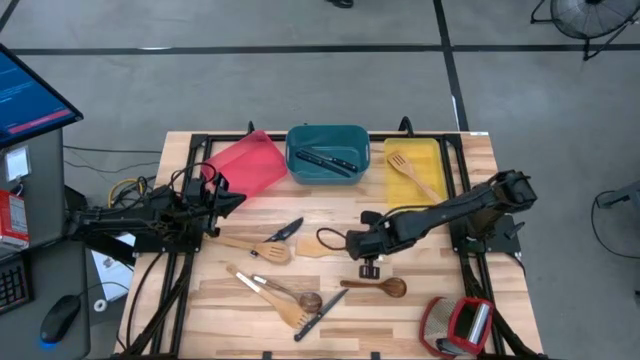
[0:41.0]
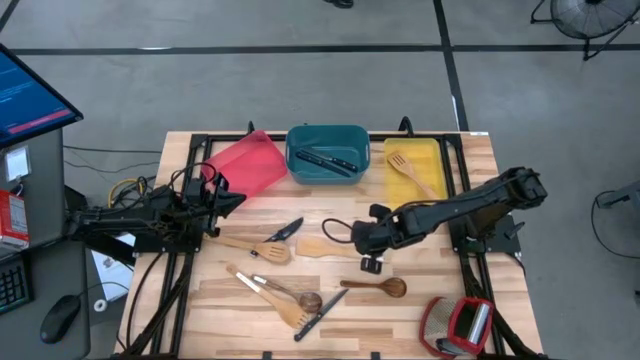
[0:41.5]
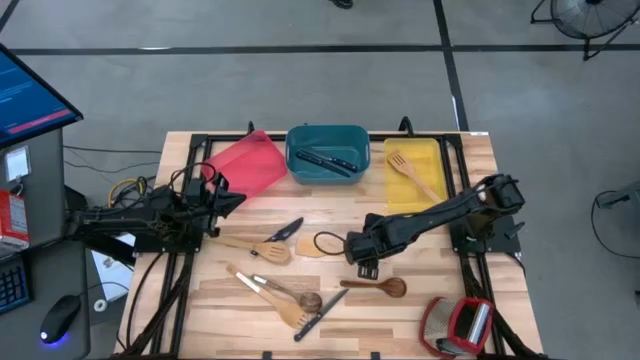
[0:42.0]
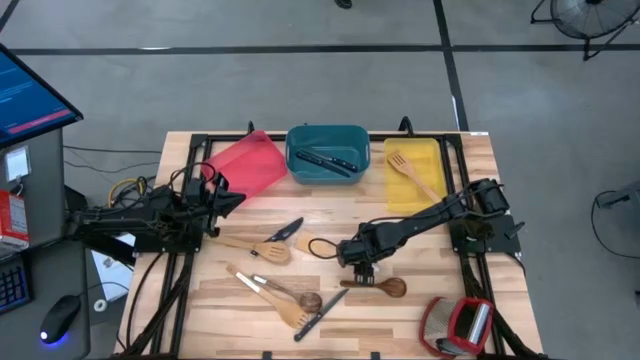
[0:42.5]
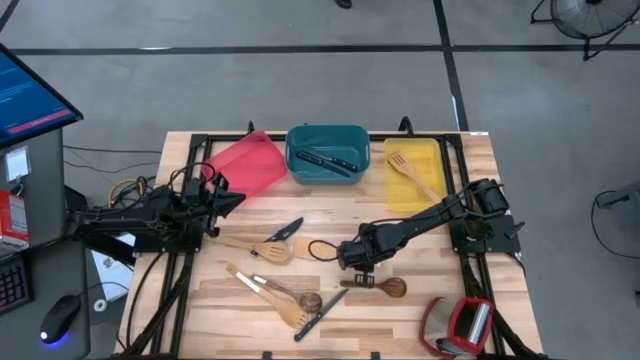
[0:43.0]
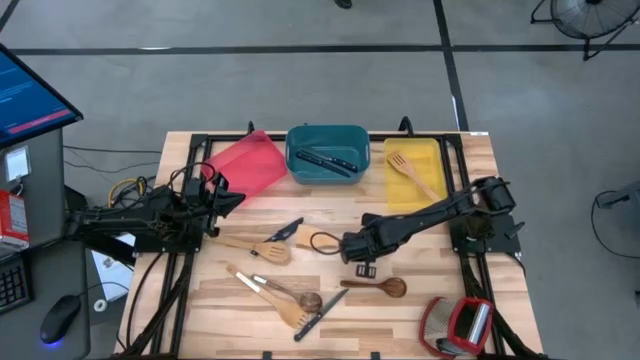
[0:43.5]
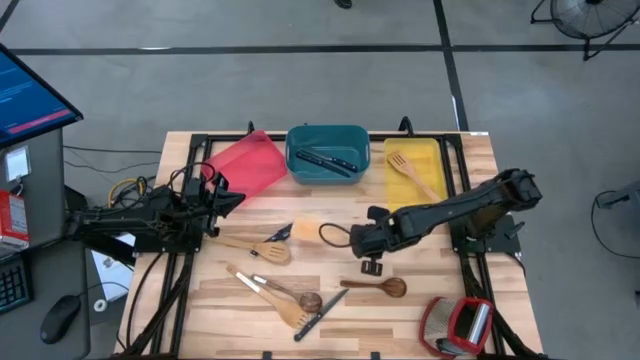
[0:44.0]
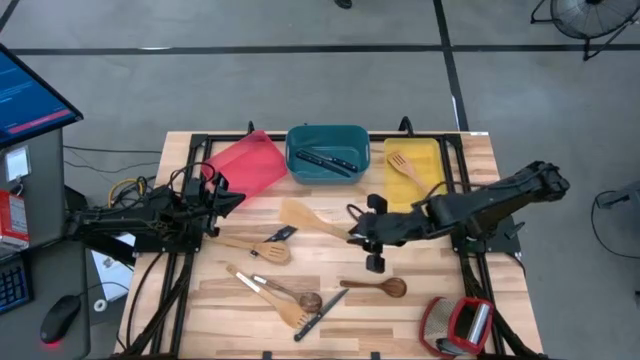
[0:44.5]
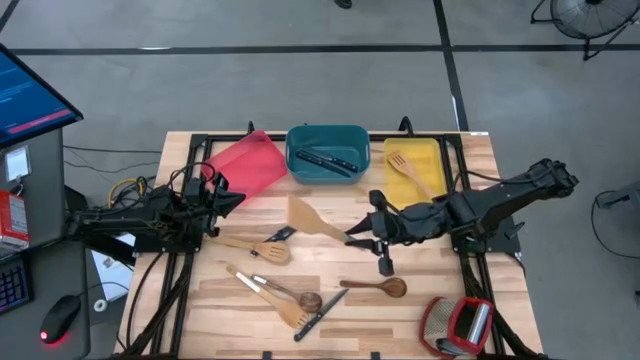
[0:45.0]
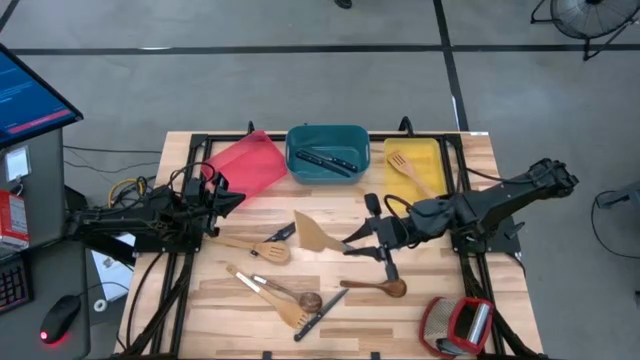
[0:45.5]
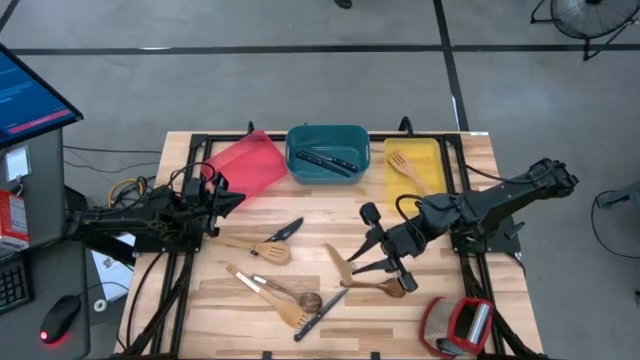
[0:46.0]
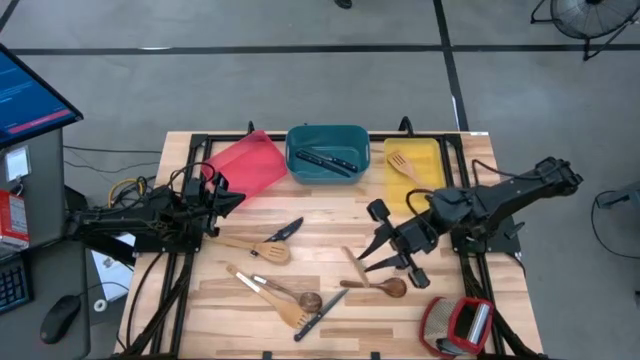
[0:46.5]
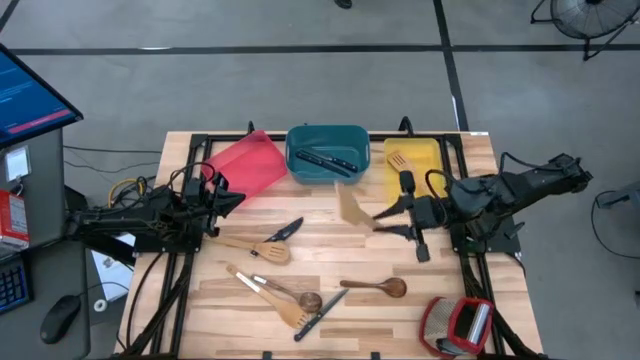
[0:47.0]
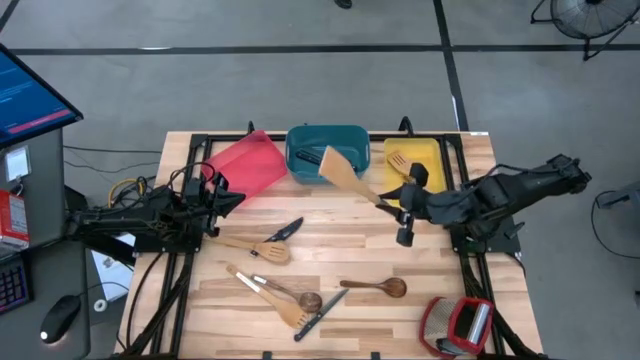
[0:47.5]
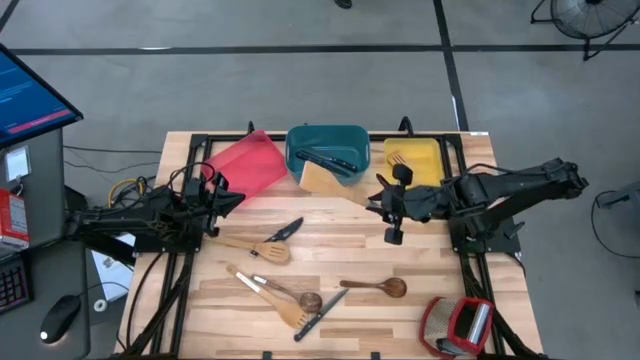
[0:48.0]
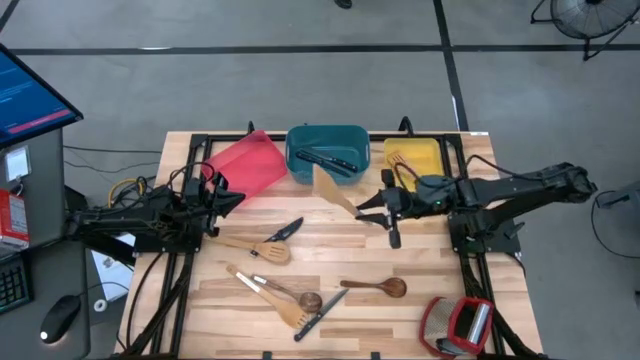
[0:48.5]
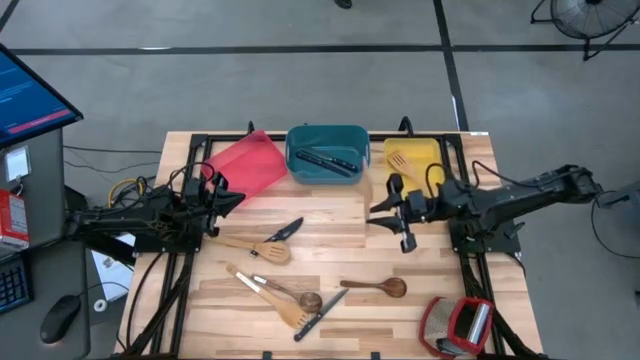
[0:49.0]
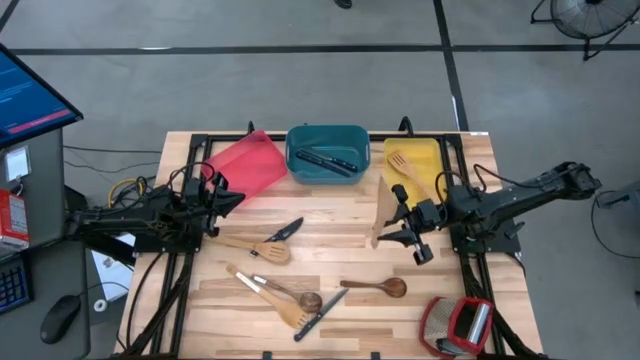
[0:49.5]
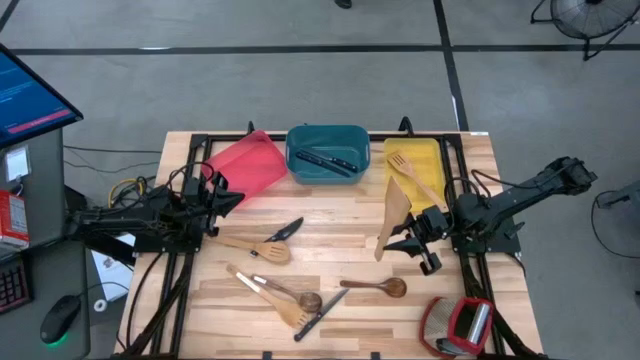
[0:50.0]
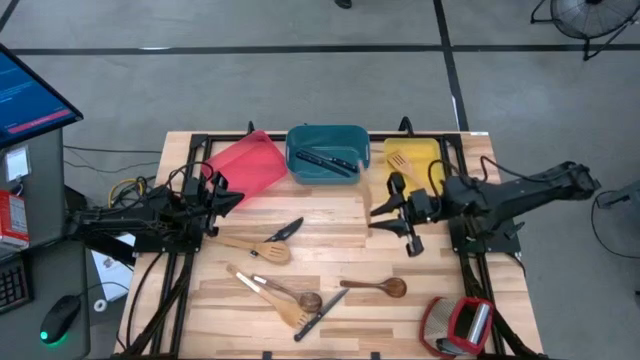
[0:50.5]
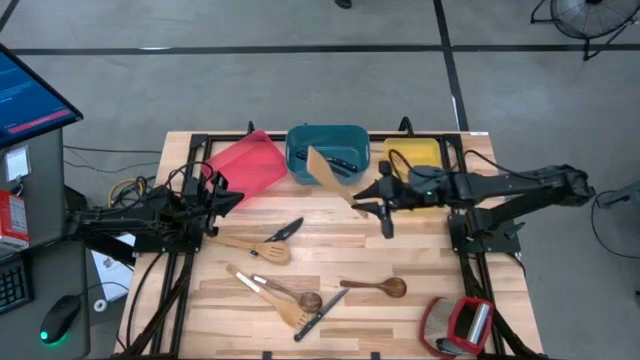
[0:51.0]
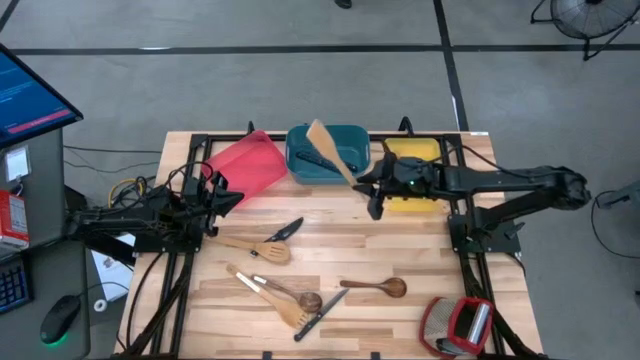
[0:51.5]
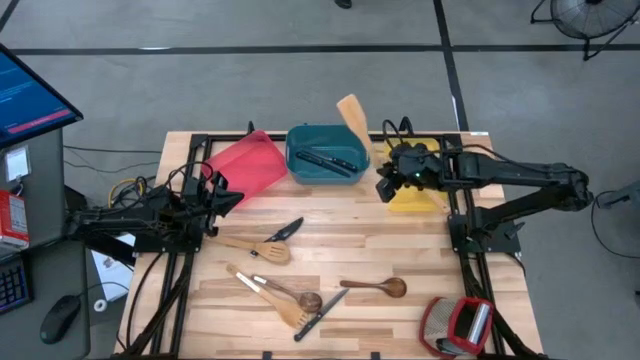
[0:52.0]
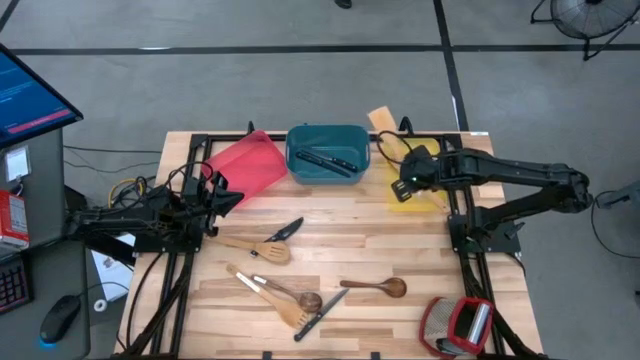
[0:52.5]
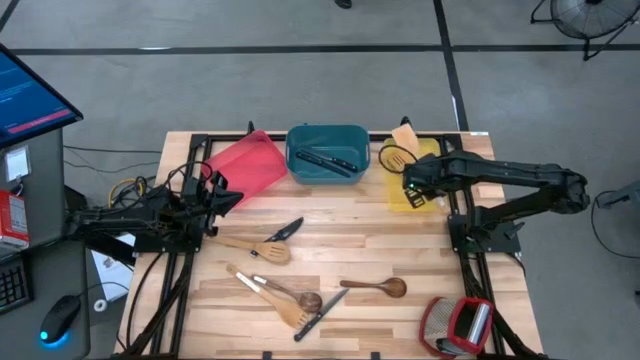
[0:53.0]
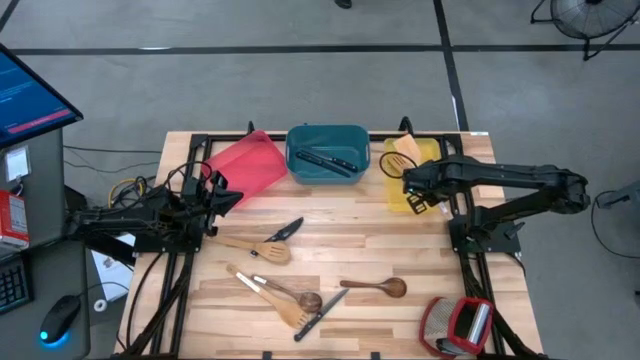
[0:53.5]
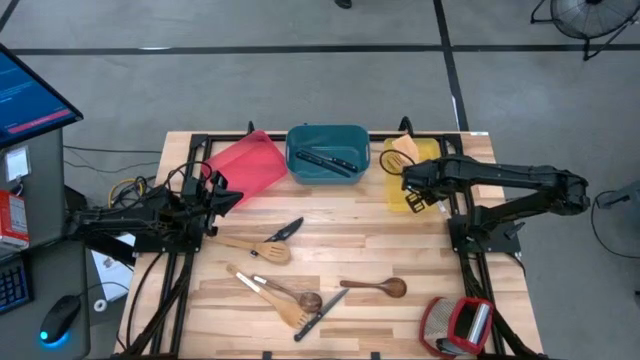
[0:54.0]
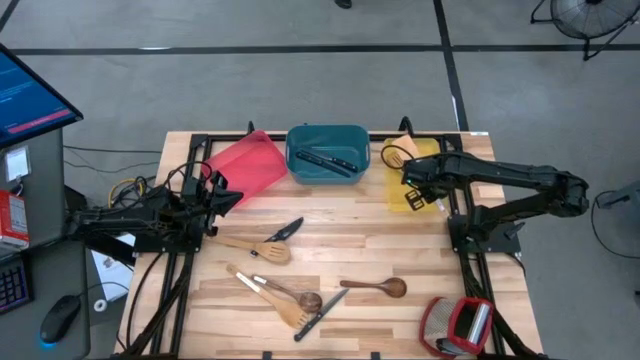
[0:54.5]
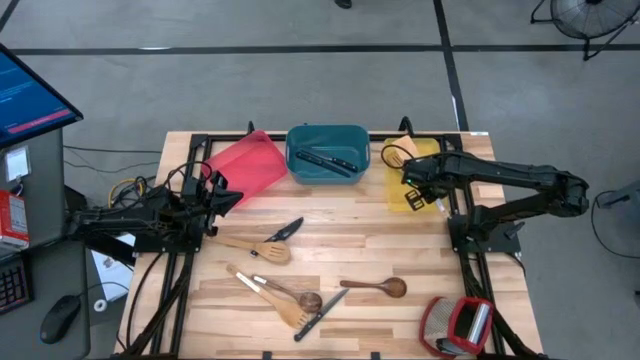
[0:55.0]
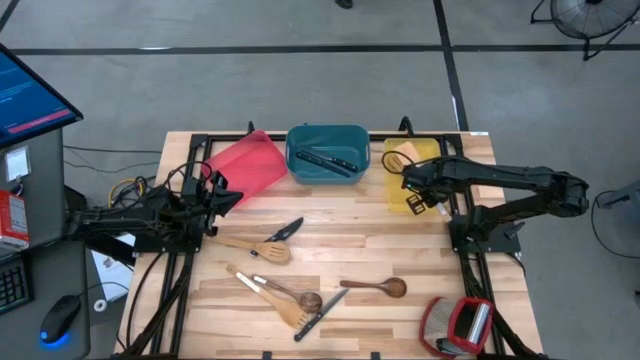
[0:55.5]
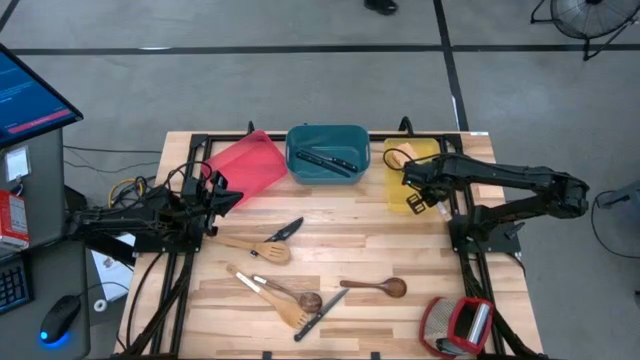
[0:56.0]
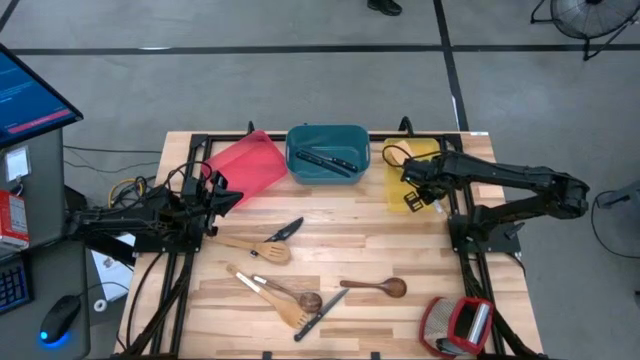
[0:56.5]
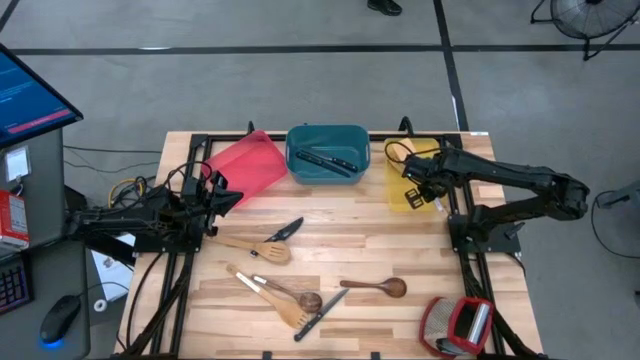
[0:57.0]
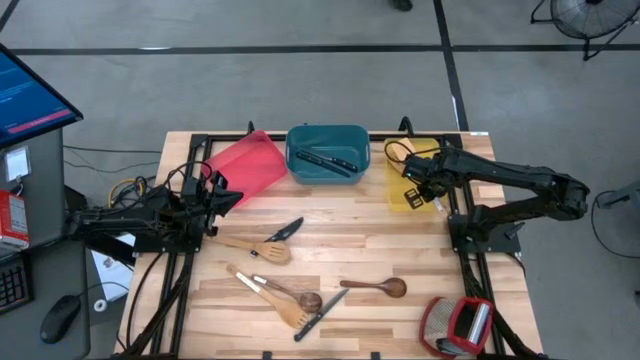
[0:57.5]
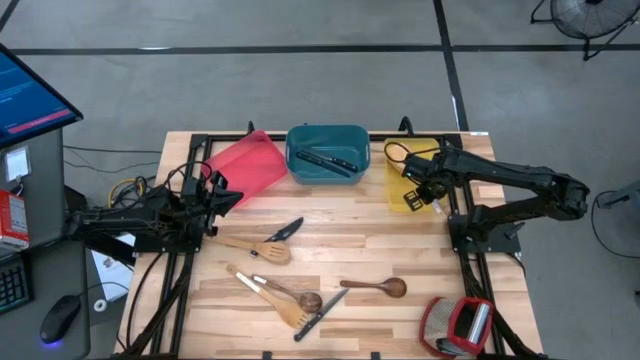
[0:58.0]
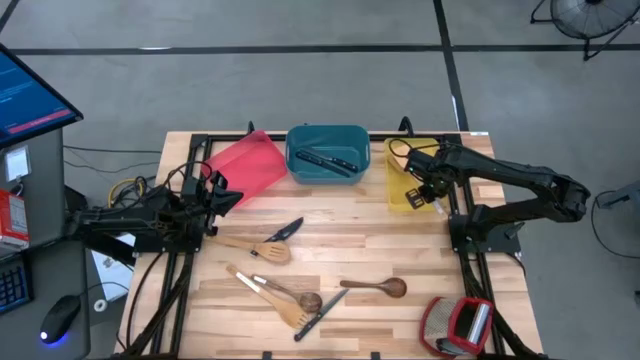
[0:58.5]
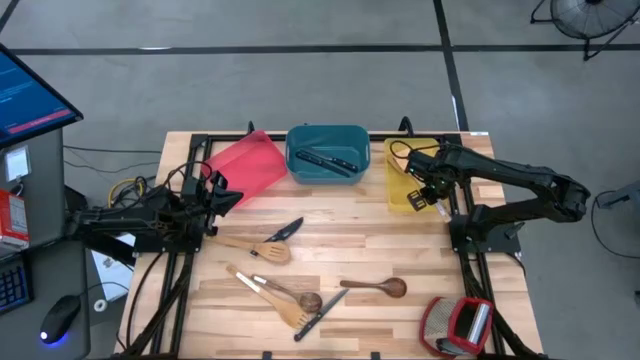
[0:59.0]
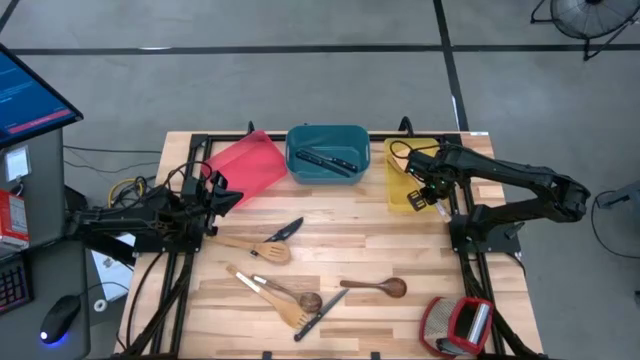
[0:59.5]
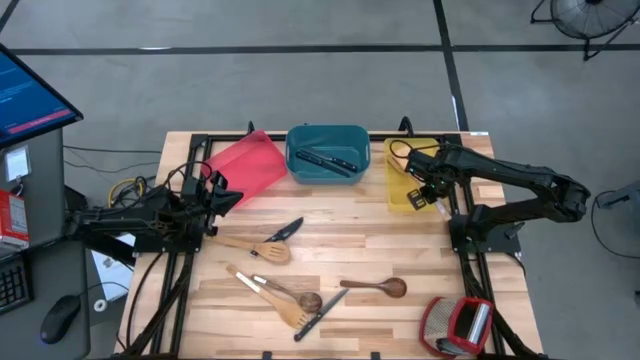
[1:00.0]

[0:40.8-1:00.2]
Task: Pick & Place Kitchen Items
Put the wooden spatula into the yellow bin

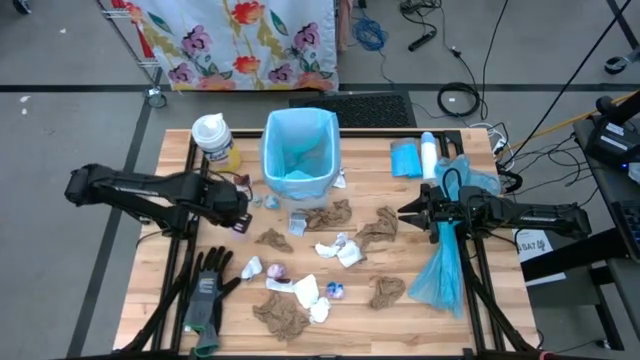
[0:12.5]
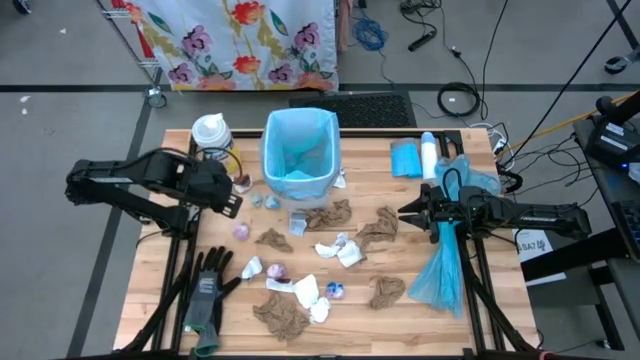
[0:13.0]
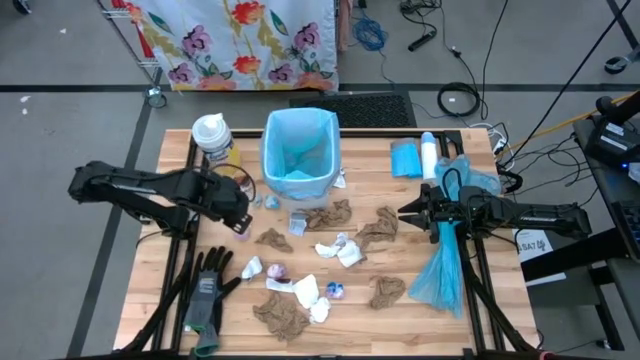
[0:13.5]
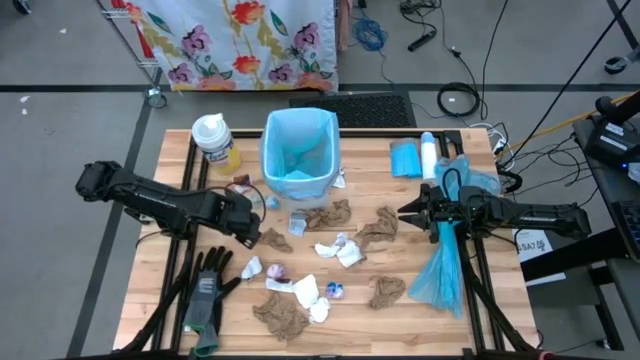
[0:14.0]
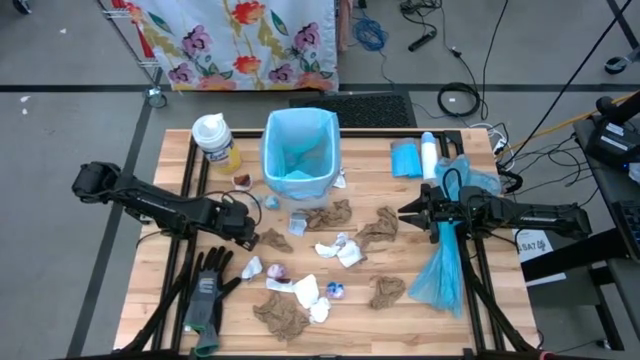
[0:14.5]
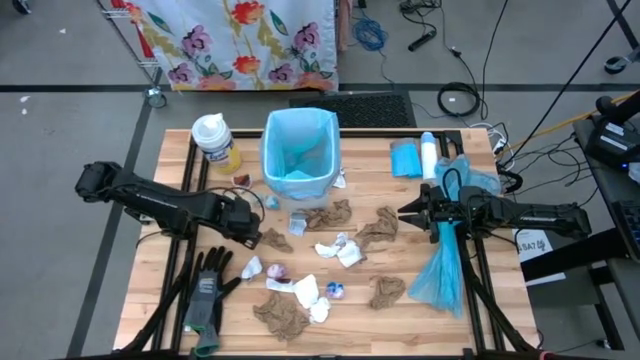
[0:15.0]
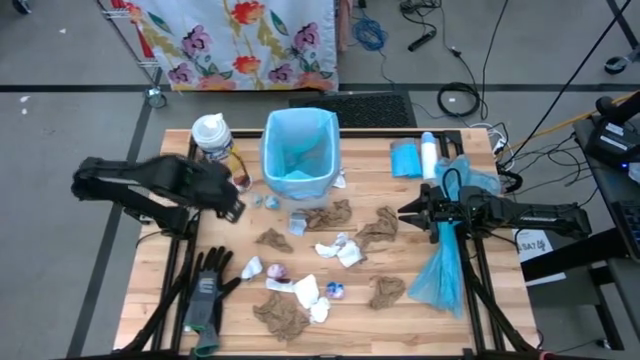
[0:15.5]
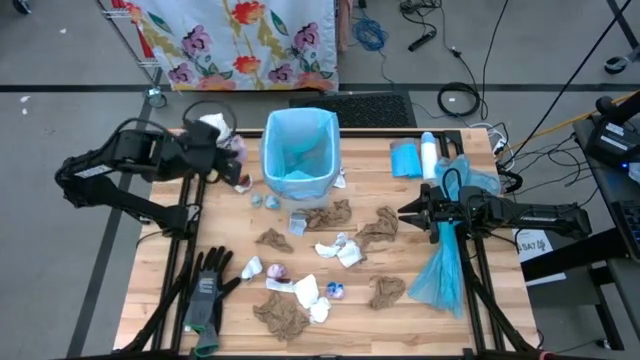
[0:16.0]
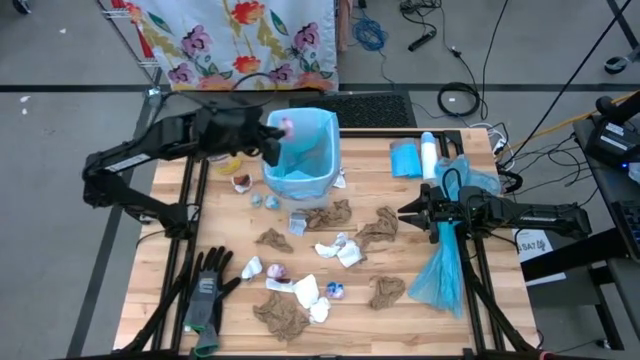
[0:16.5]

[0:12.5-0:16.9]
Task: place trash/remove bag and relplace
Put the pink plastic into the trash bin
